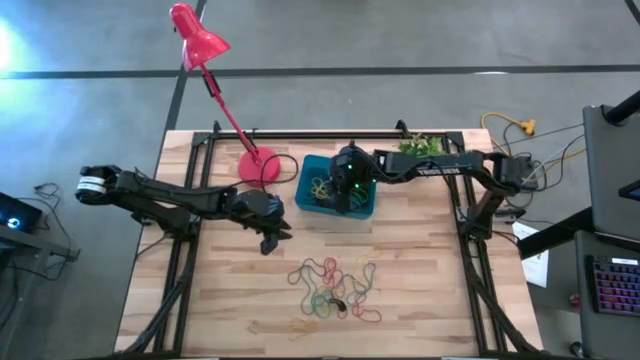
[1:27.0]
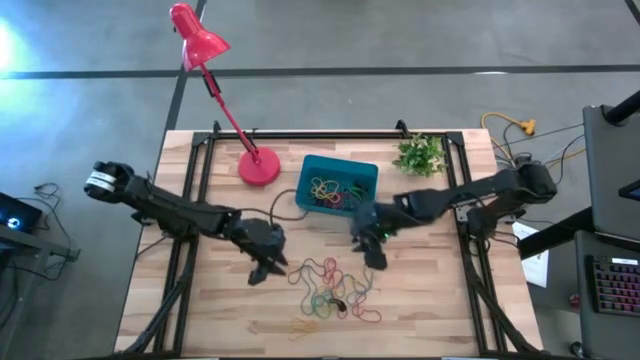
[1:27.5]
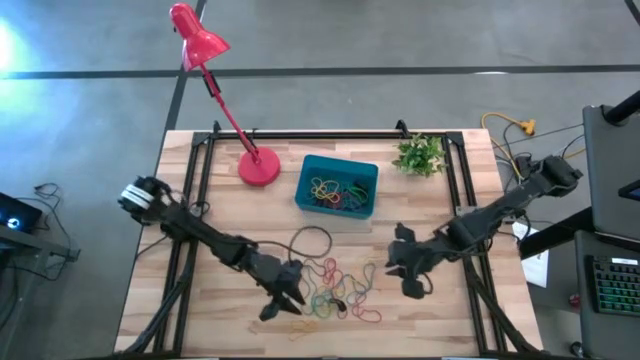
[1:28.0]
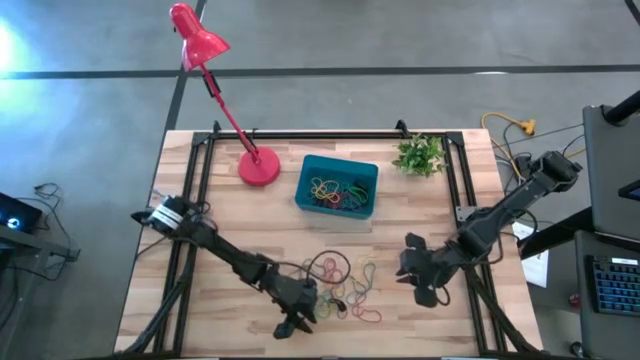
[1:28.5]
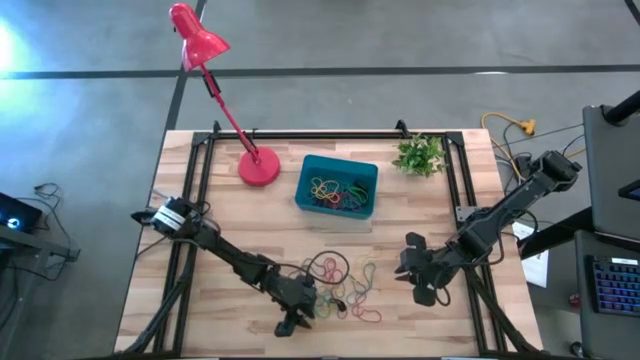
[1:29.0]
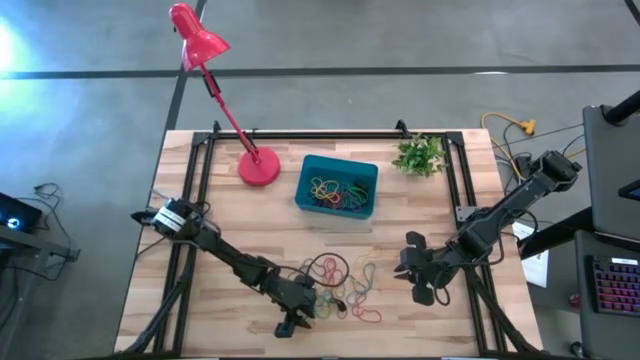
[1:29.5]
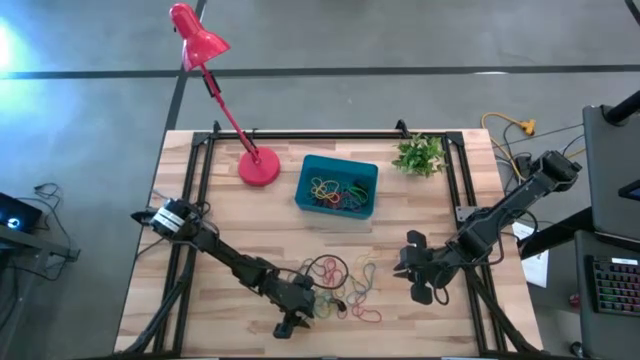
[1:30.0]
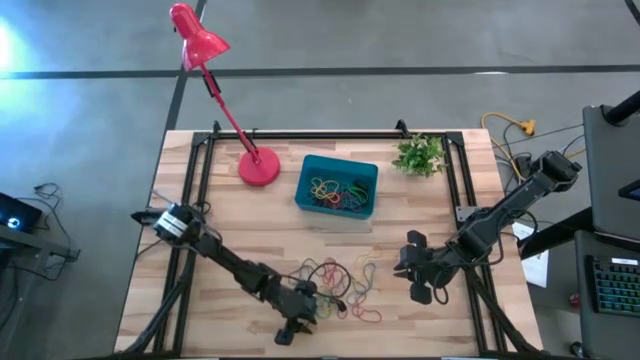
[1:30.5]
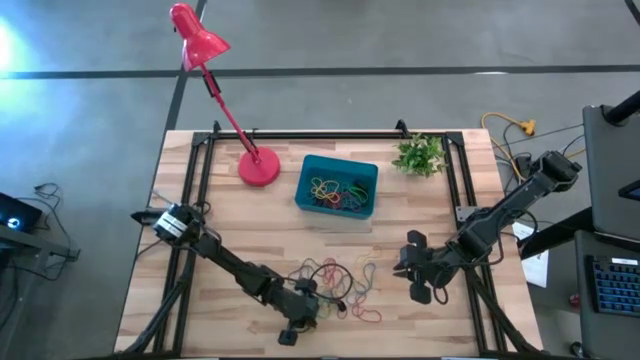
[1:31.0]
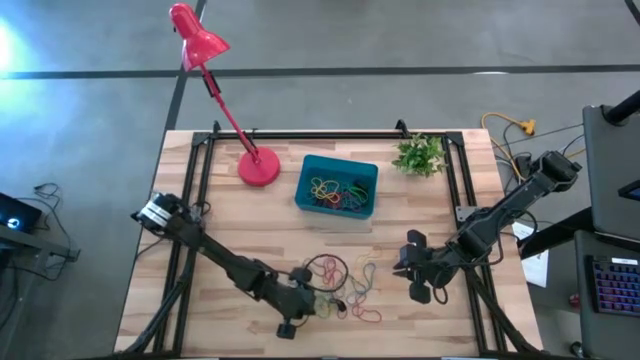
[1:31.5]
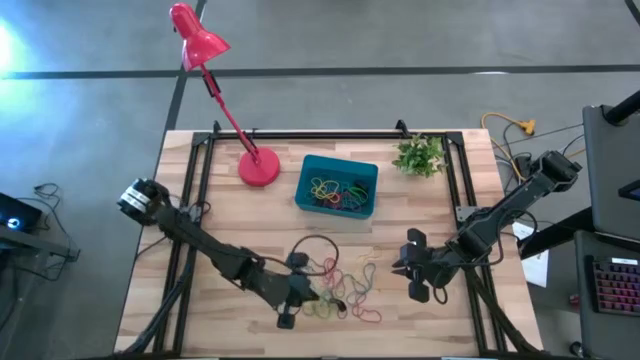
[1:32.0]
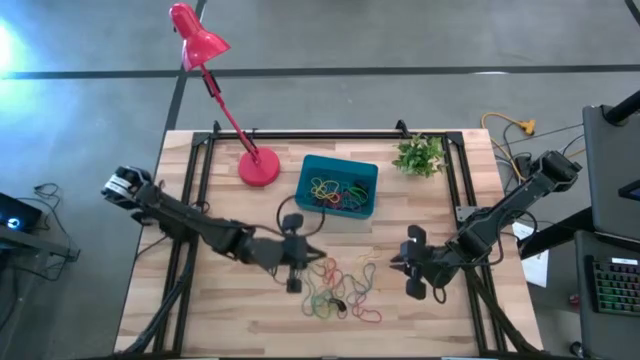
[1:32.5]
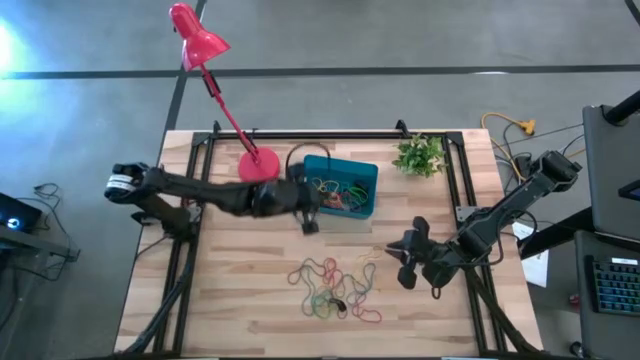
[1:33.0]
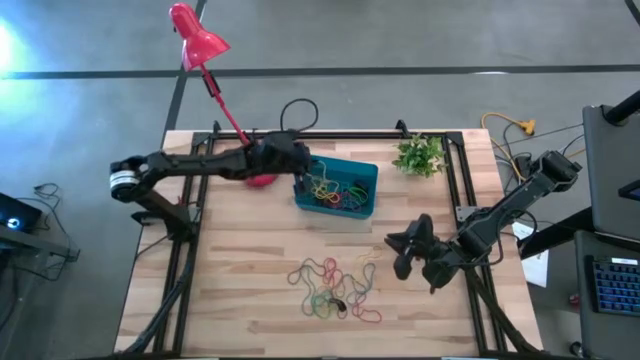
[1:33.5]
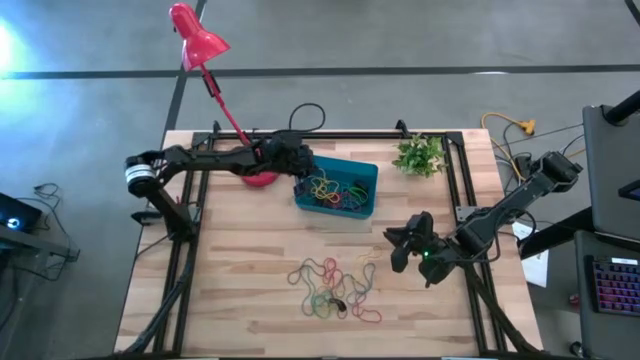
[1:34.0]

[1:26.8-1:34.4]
Task: Pick and place rubber bands into bin
Put the yellow rubber band into the blue bin

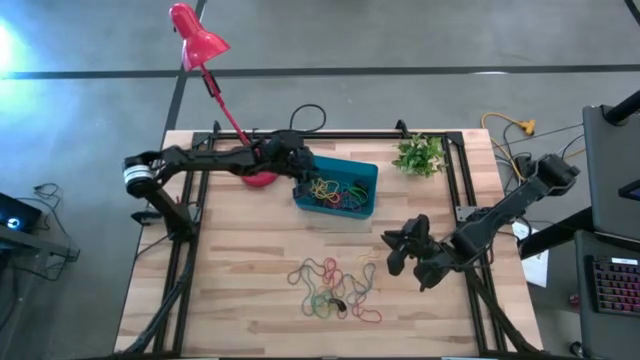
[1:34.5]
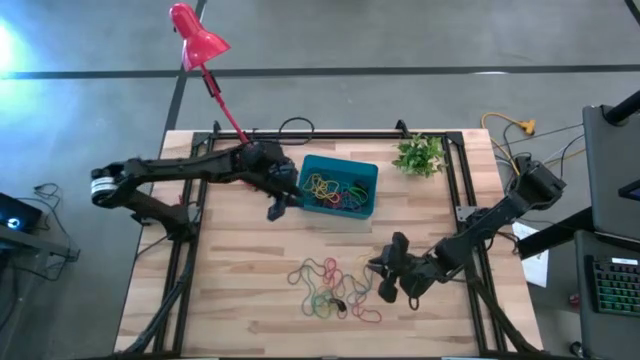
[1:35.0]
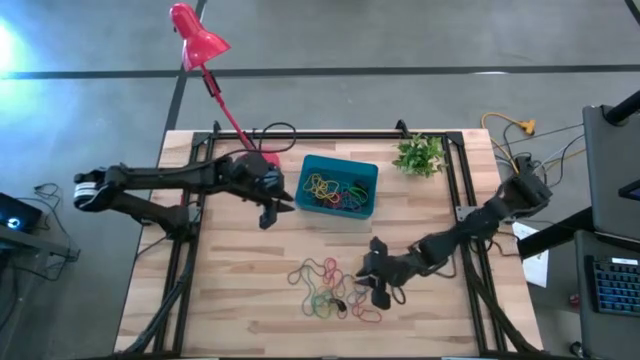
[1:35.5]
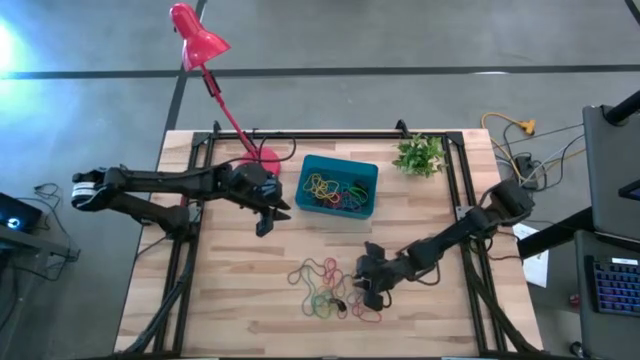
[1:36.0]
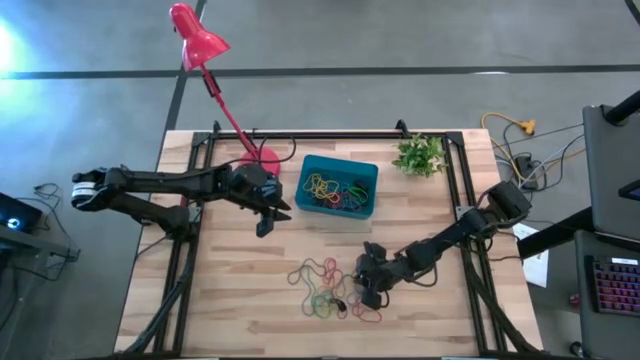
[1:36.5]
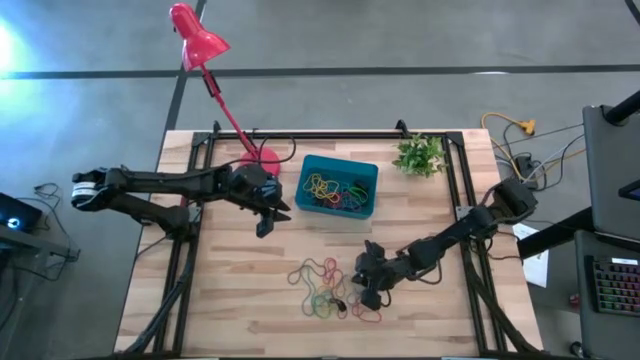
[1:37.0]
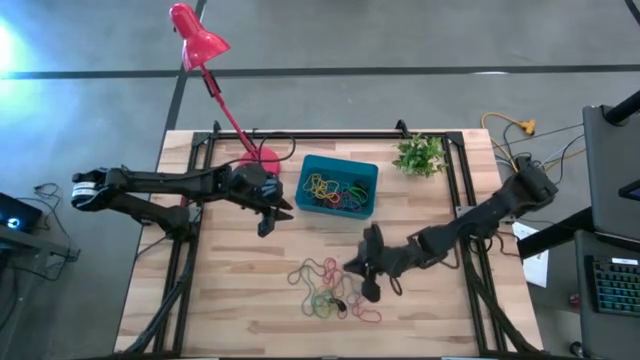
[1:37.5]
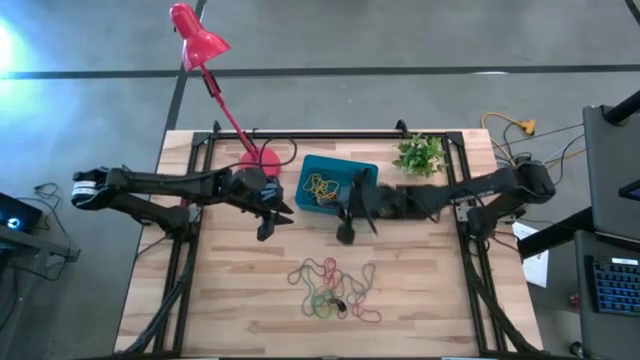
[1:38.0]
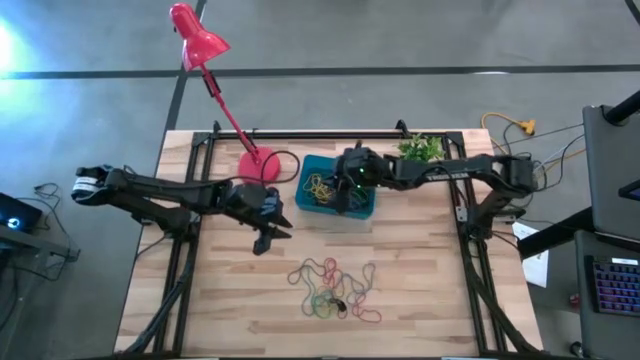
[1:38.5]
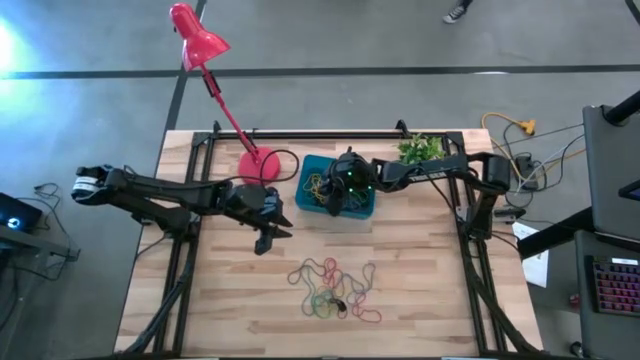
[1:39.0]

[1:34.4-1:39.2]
Put the yellow rubber band into the blue bin

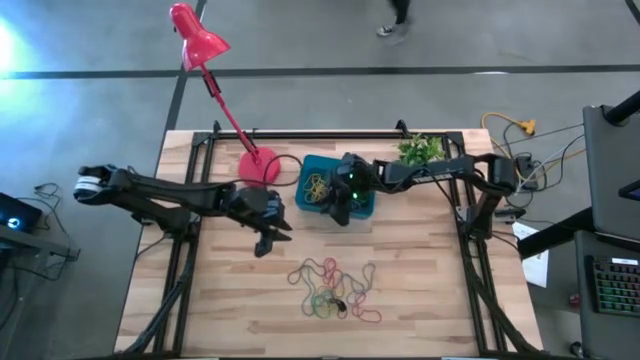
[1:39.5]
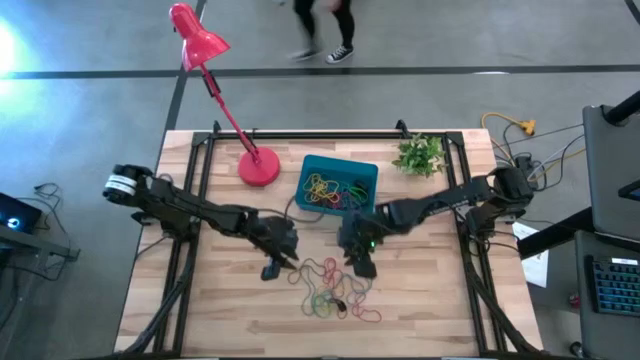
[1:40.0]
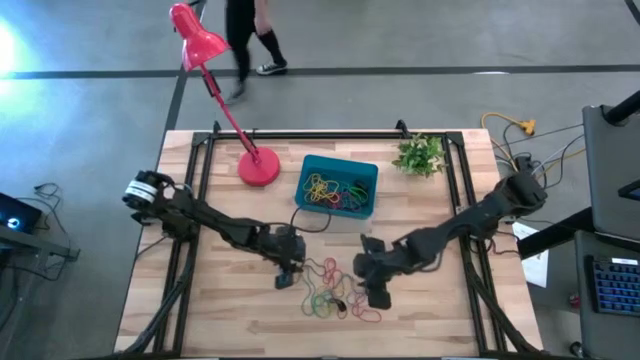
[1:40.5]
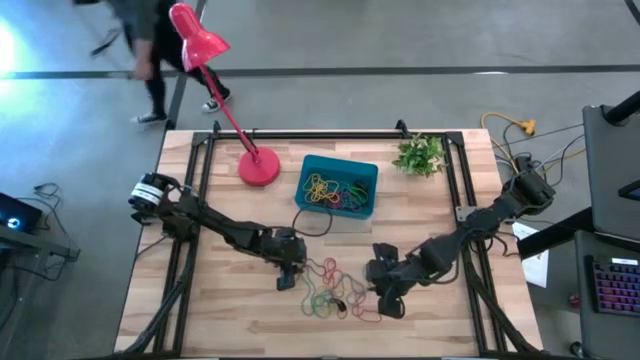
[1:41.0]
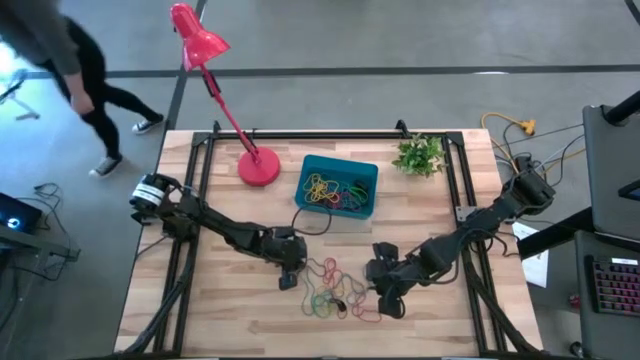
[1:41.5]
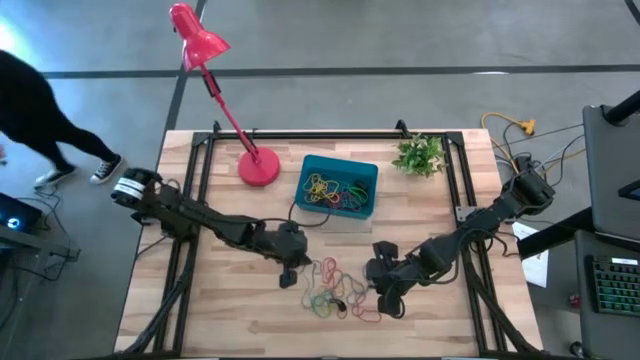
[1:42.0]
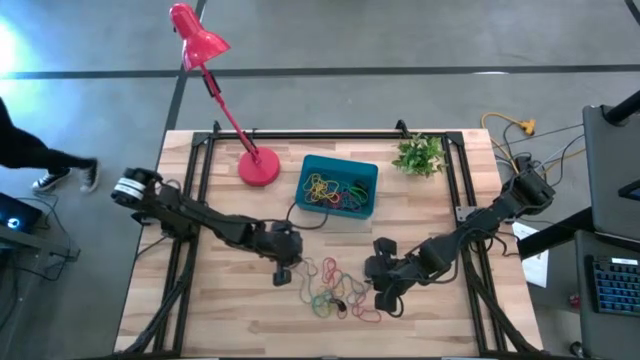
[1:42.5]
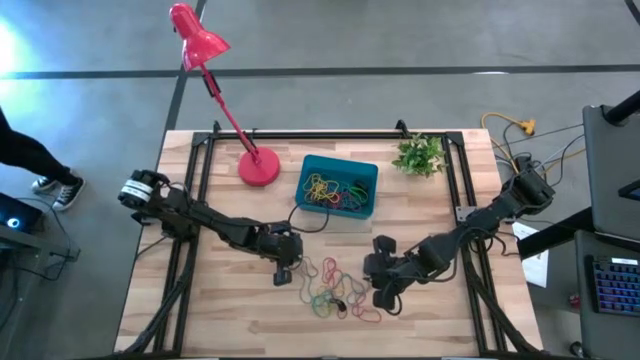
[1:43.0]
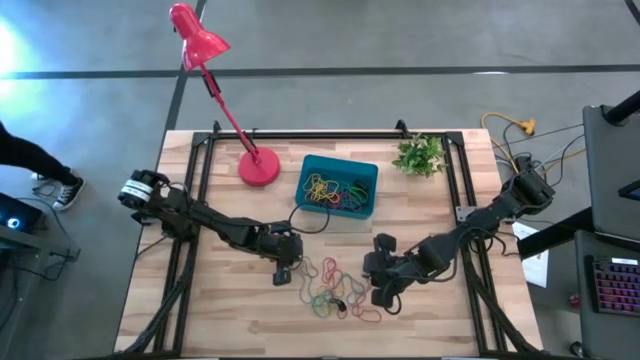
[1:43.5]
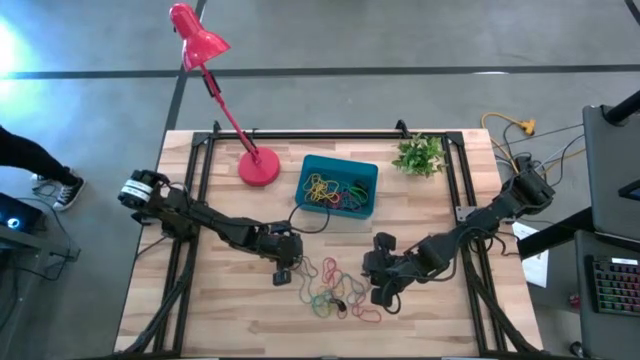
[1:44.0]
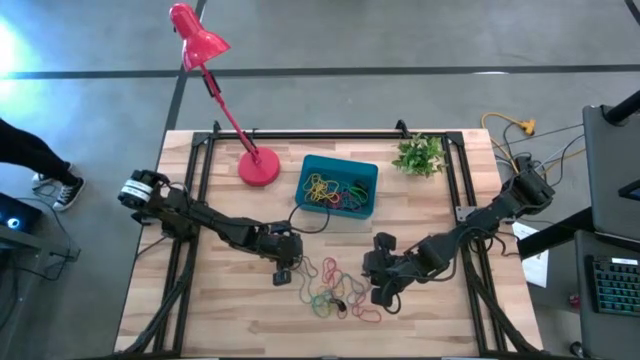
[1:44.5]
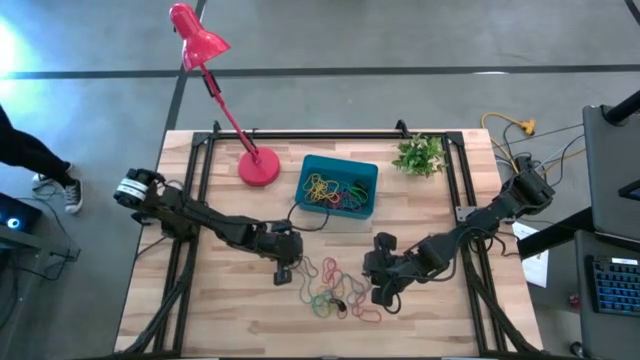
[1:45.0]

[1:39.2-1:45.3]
Put the blue rubber band into the blue bin

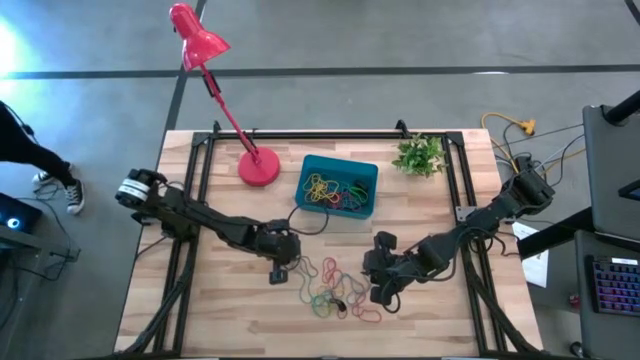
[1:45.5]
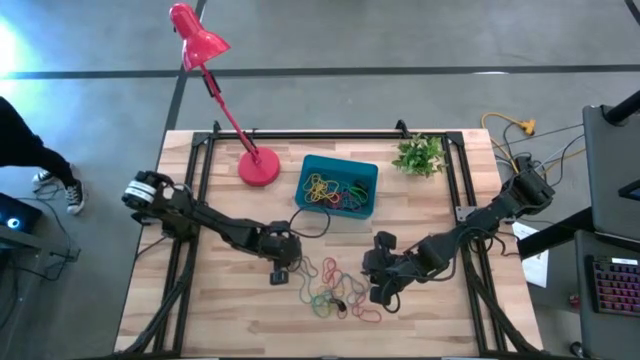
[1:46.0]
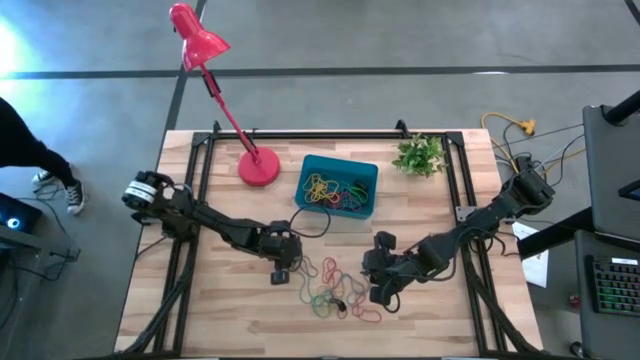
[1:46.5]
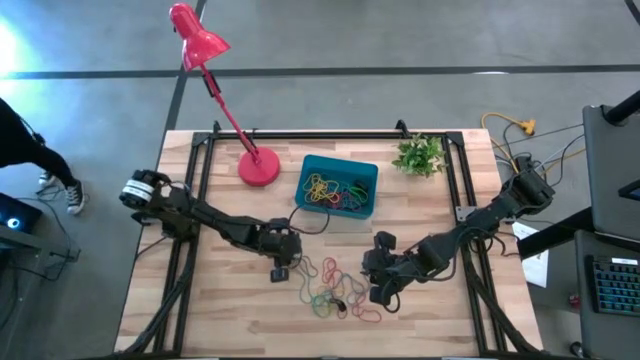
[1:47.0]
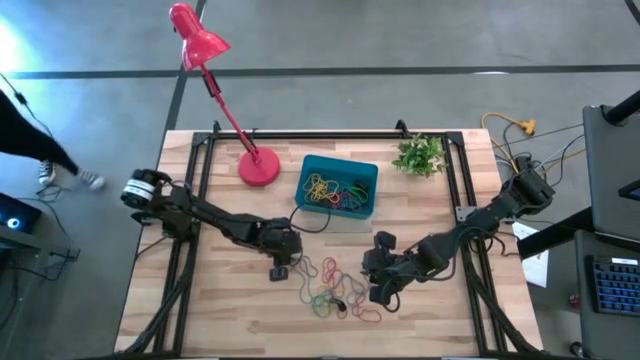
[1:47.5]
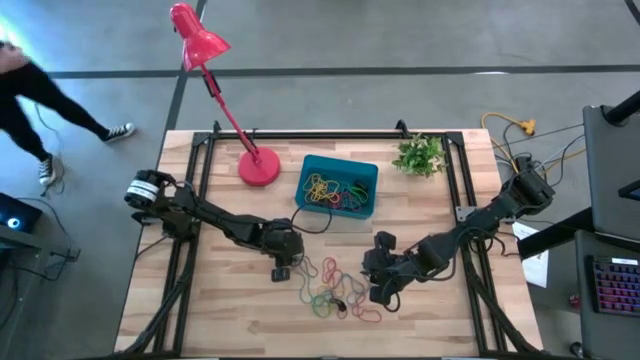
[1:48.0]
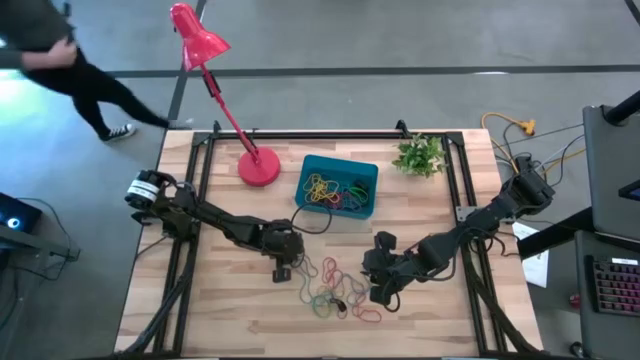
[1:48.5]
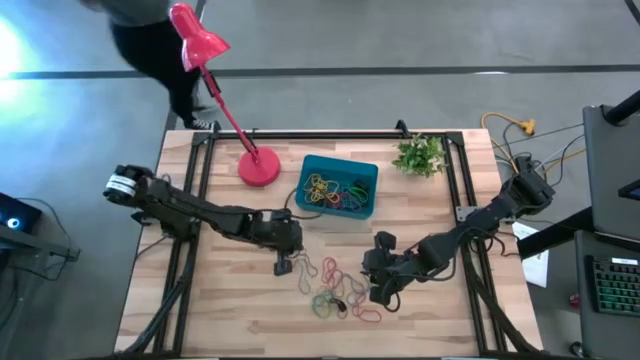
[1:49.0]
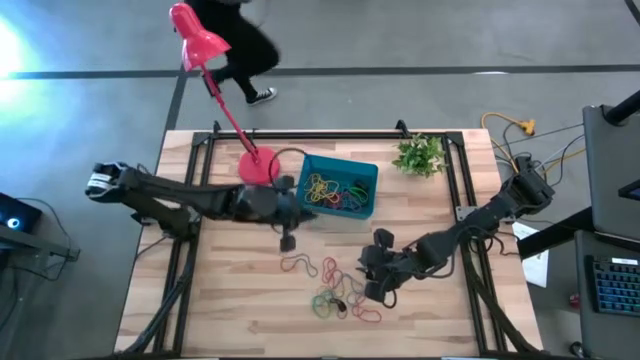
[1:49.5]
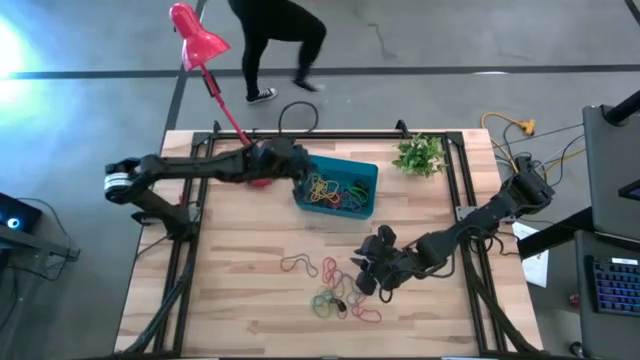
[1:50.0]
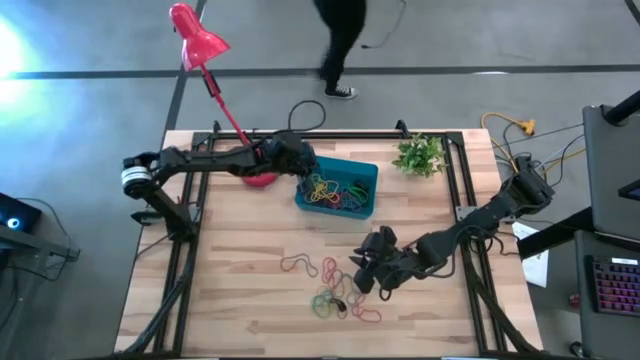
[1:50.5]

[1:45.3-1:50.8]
Put the blue rubber band into the blue bin
